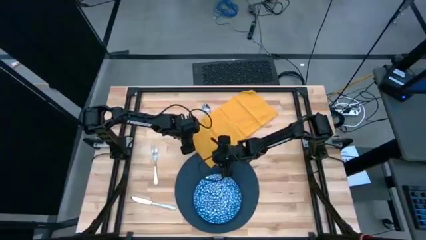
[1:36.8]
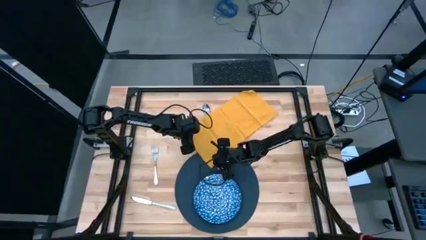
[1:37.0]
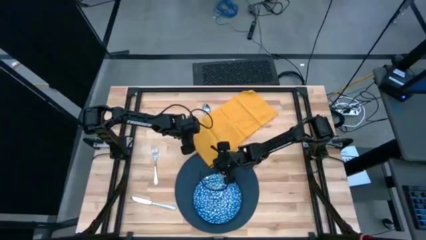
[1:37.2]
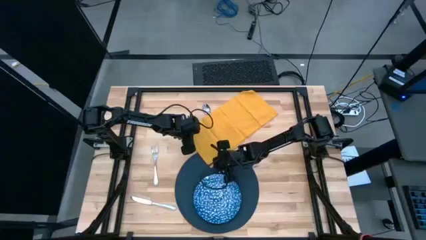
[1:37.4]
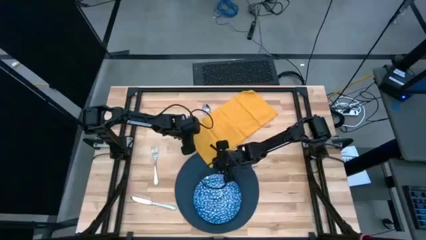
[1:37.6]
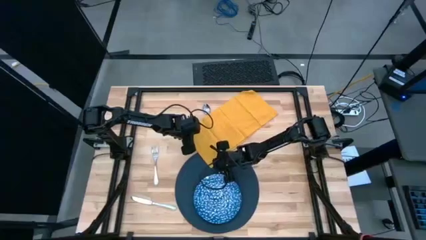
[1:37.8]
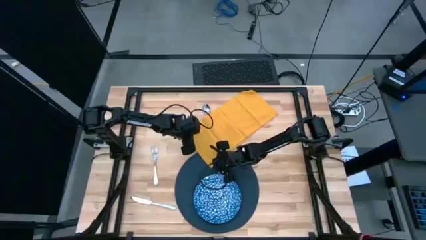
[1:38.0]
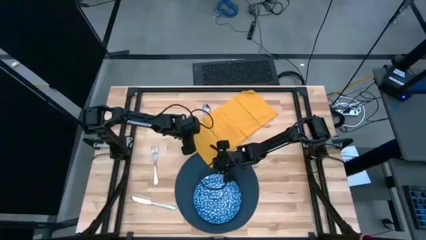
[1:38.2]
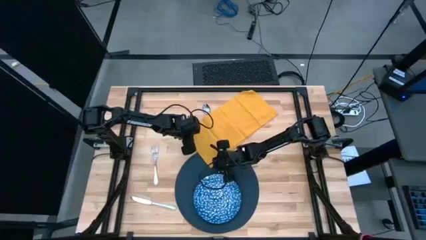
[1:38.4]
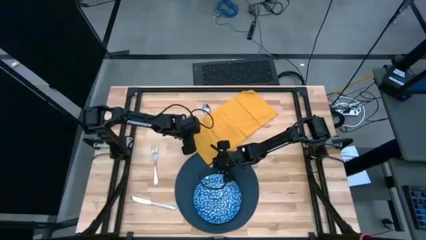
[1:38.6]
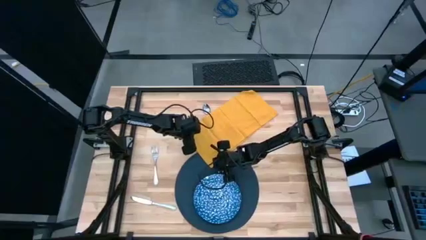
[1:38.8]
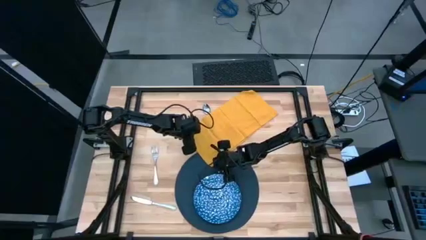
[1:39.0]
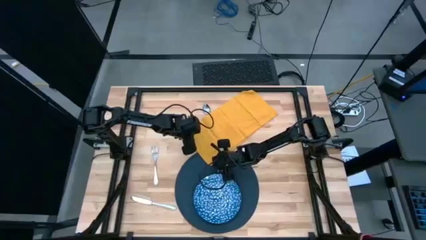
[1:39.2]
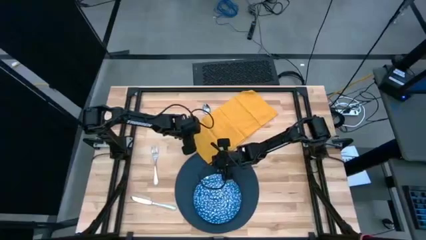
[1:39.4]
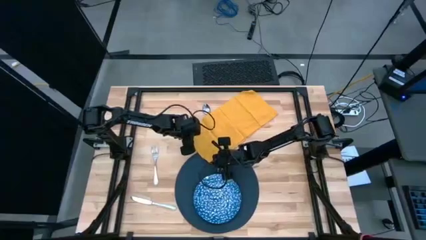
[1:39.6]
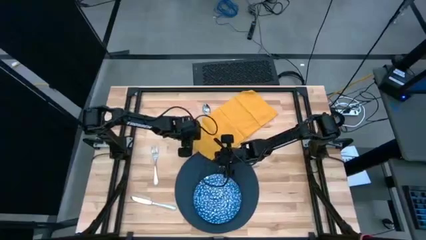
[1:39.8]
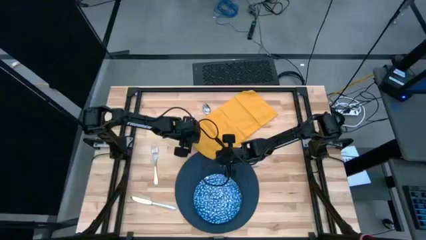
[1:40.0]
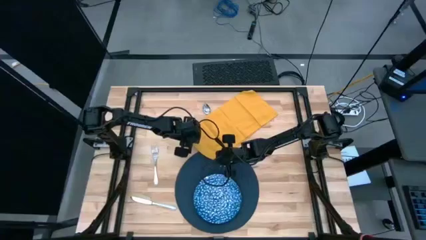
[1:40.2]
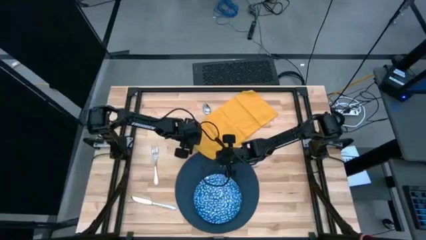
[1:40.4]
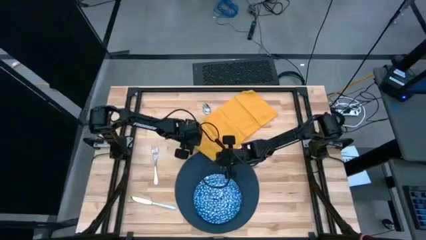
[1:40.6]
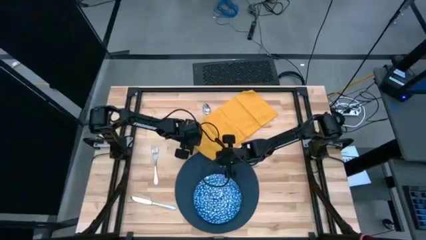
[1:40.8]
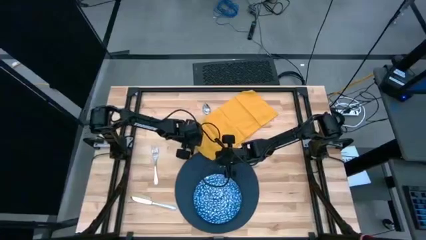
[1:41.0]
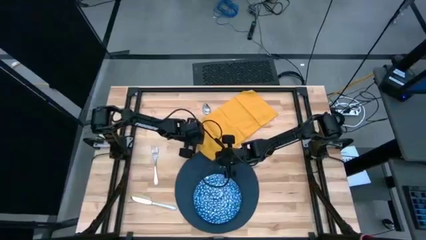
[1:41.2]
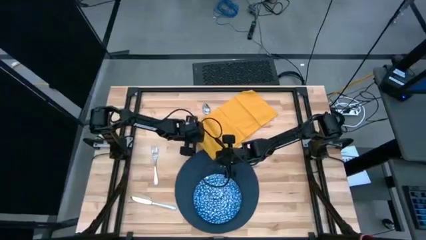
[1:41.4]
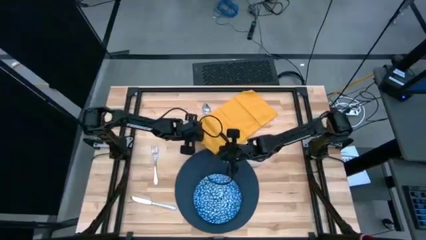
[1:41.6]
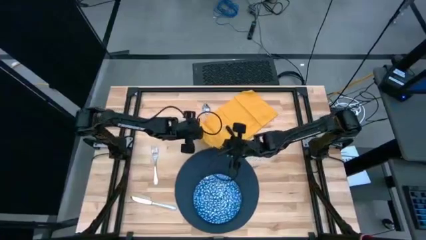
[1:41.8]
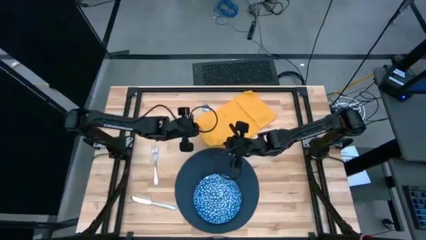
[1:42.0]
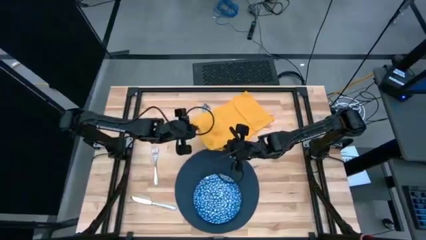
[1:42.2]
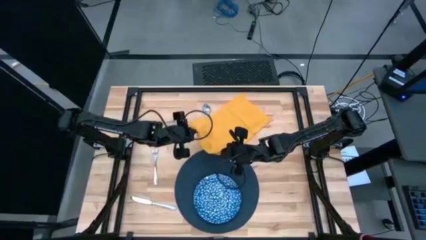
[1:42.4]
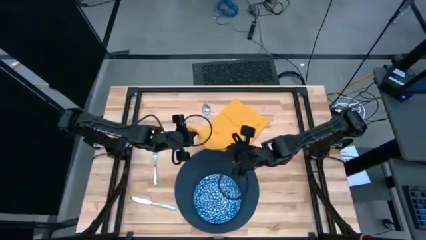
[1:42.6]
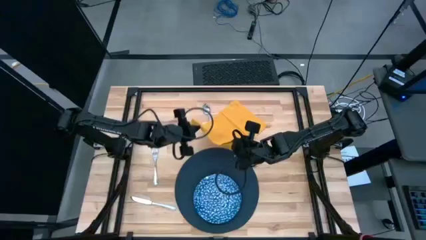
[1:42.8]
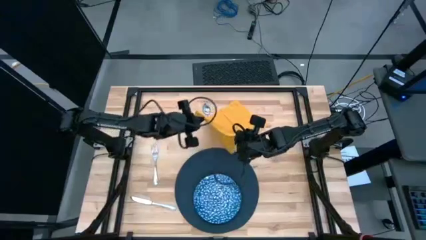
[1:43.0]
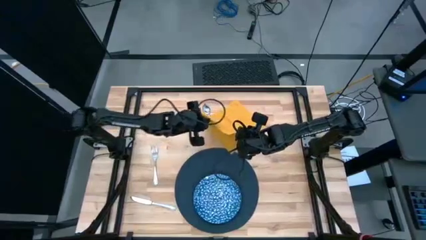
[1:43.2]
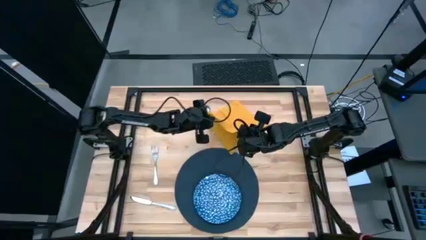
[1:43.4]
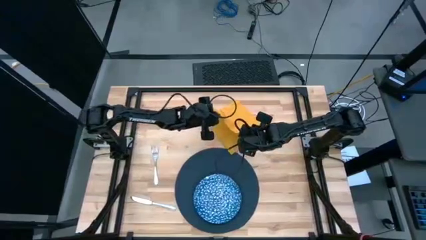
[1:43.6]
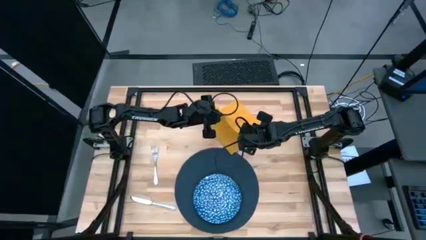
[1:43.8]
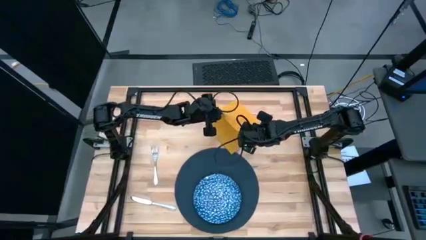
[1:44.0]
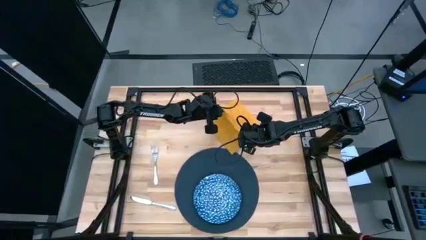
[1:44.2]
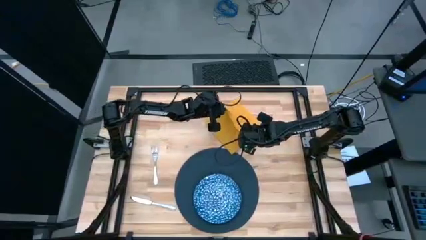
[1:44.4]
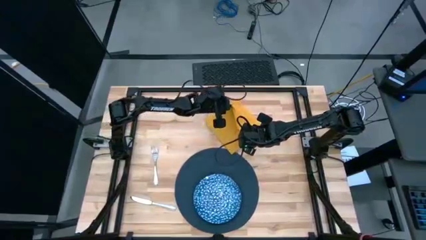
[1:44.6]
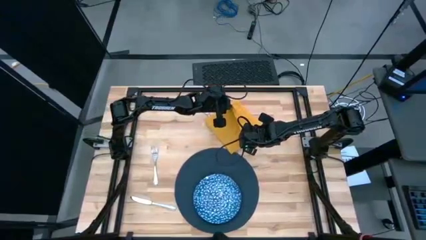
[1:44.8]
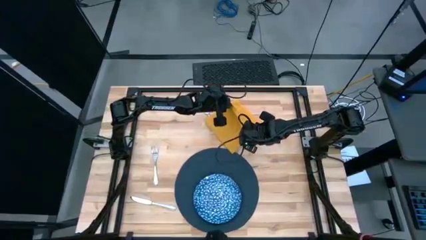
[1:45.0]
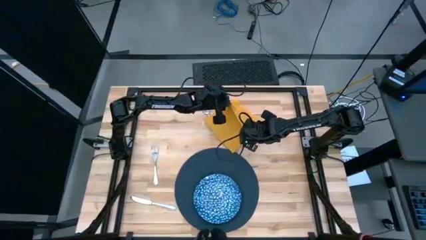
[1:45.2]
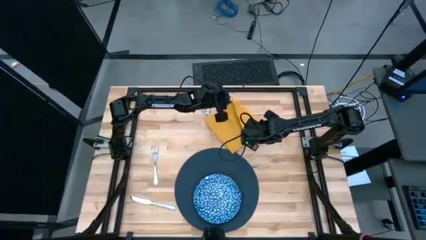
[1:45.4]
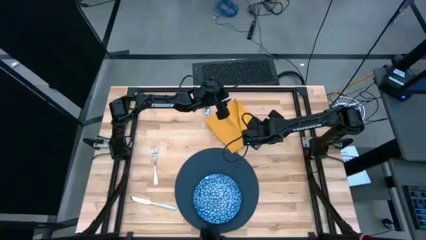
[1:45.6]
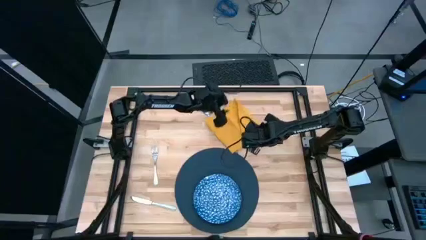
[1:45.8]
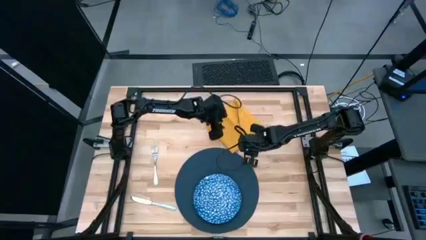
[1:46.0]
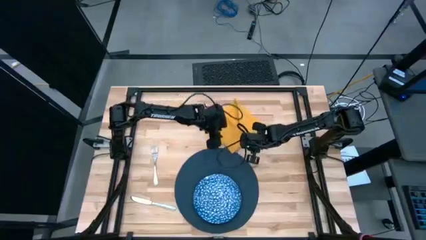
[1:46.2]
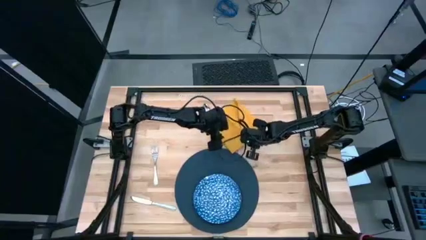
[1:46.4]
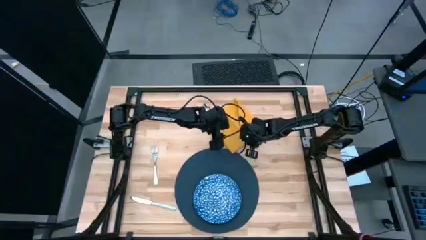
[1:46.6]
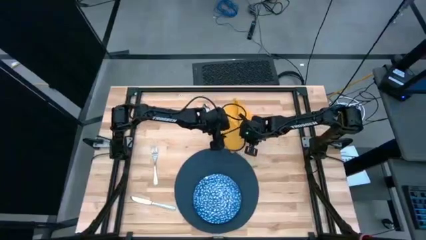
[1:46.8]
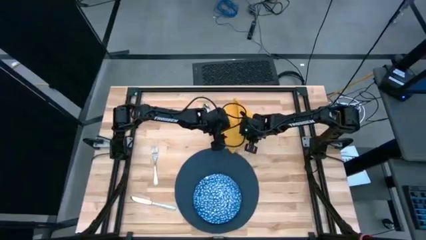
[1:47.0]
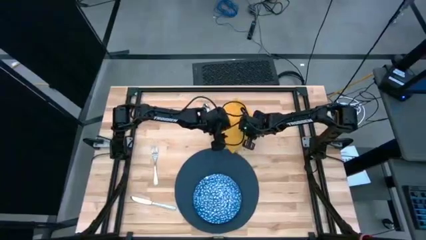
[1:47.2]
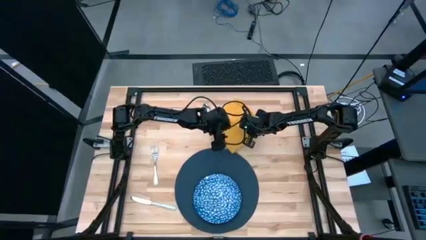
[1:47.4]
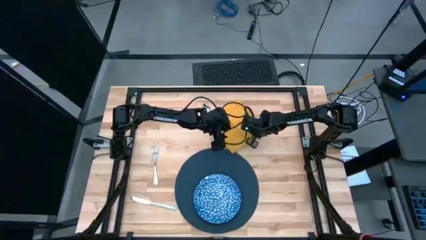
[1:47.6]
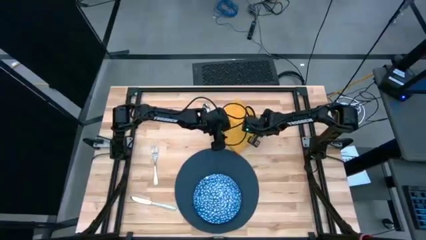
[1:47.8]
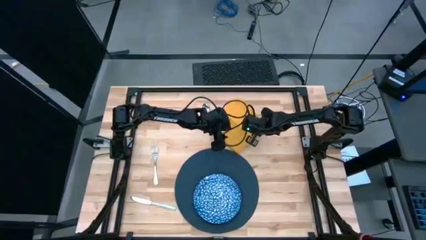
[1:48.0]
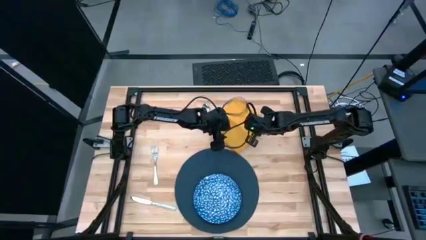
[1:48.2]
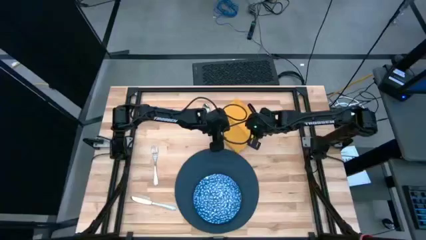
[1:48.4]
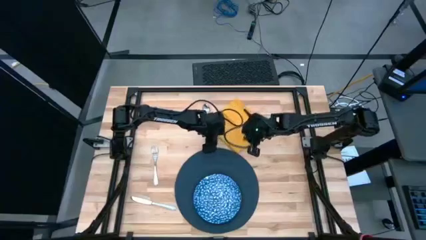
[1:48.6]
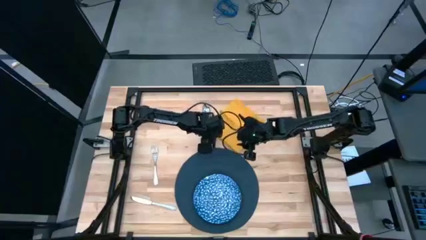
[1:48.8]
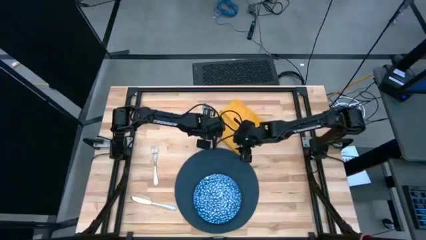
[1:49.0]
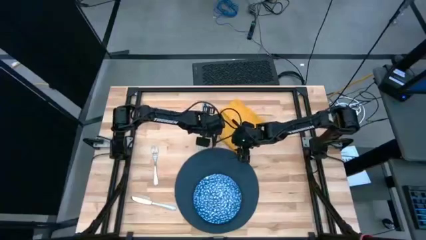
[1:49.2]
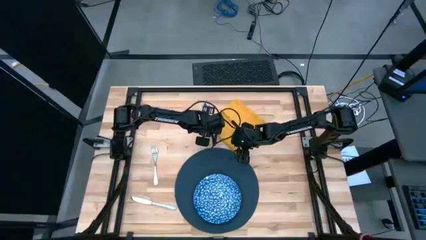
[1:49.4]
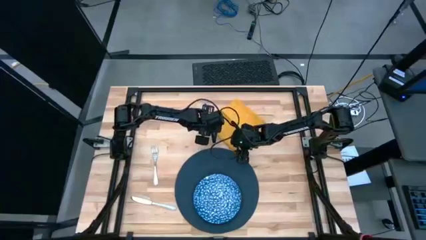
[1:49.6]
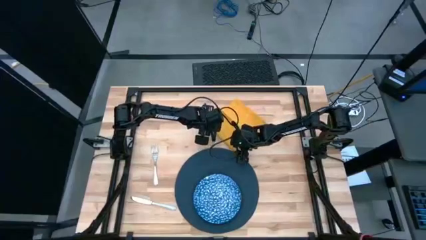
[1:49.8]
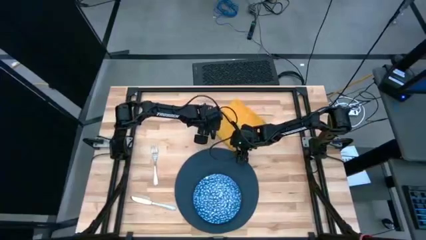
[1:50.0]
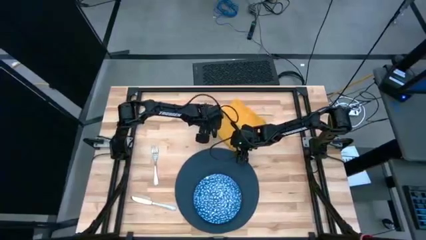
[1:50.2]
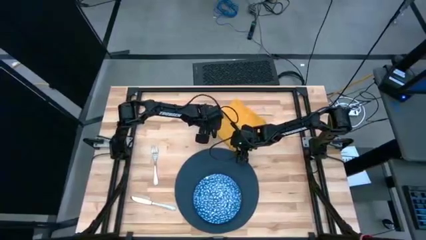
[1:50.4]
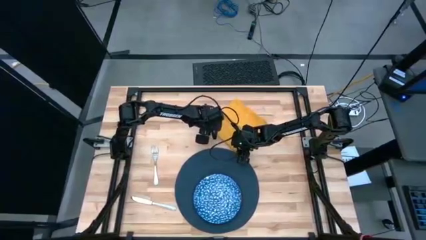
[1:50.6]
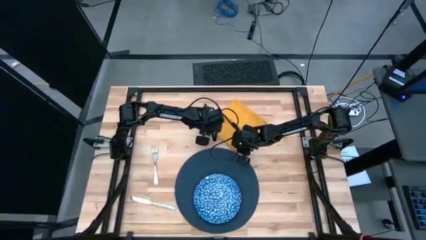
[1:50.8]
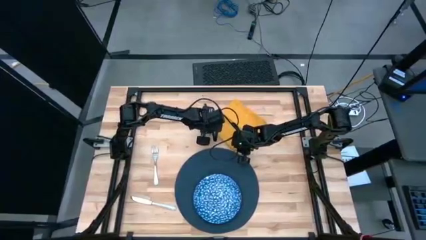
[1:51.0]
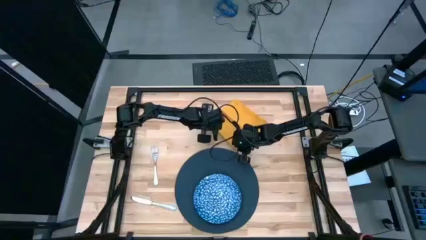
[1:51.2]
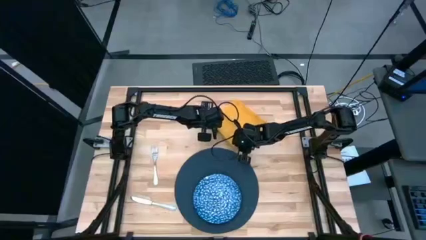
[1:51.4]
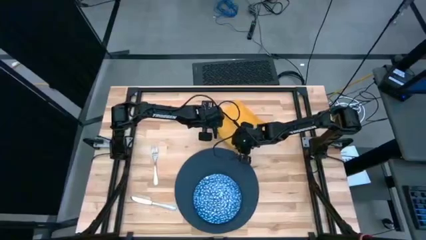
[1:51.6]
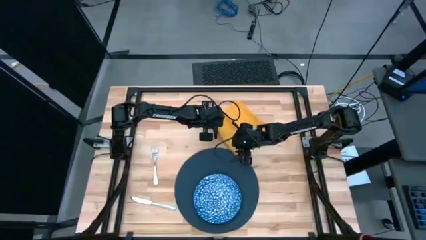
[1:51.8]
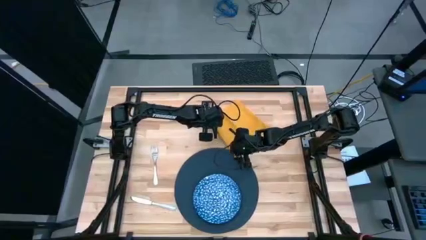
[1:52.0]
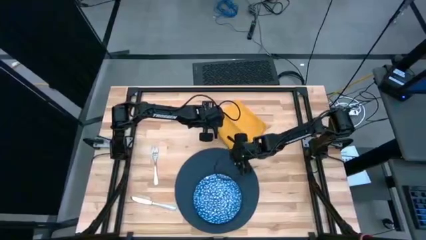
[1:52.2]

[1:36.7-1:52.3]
Task: Set table place
Fold the yellow table napkin
